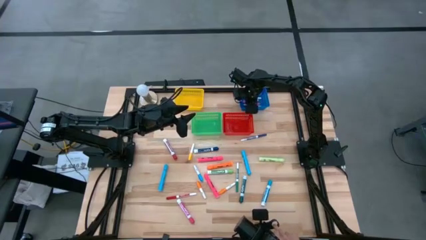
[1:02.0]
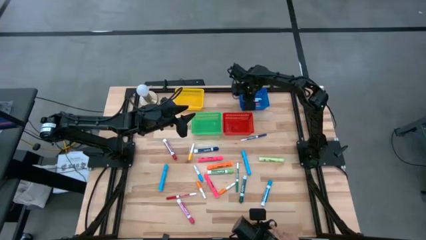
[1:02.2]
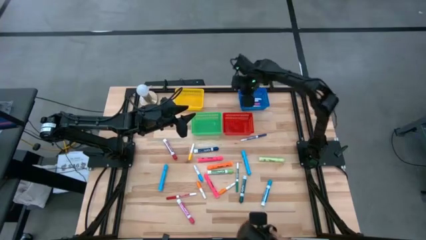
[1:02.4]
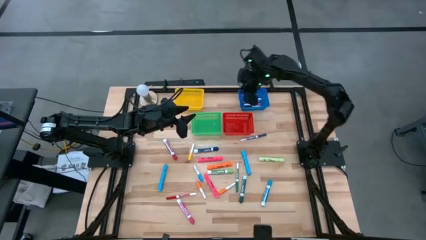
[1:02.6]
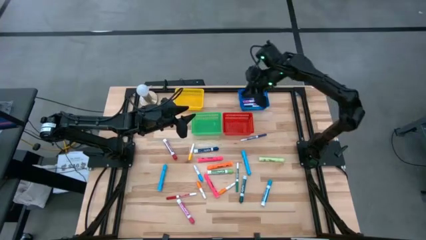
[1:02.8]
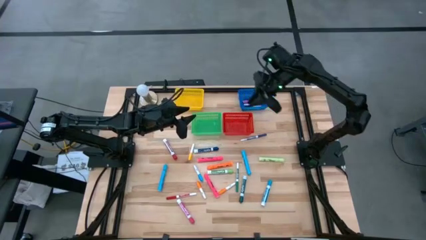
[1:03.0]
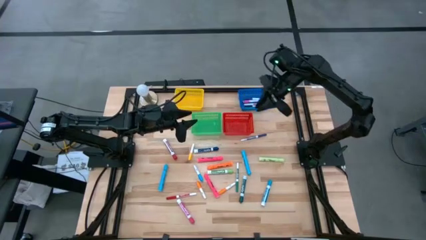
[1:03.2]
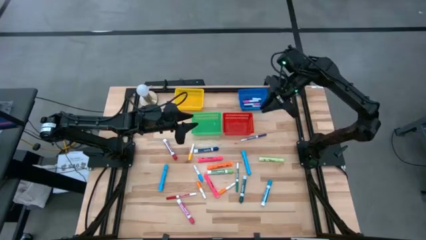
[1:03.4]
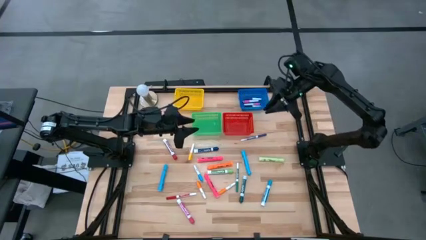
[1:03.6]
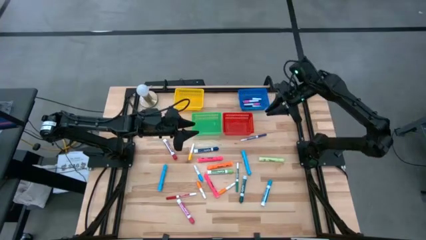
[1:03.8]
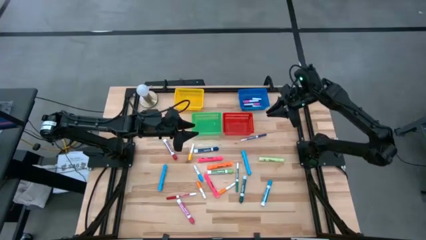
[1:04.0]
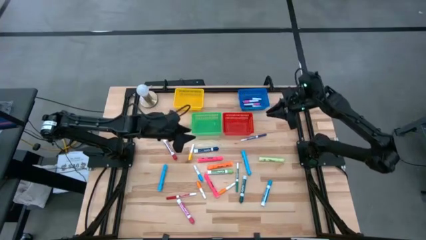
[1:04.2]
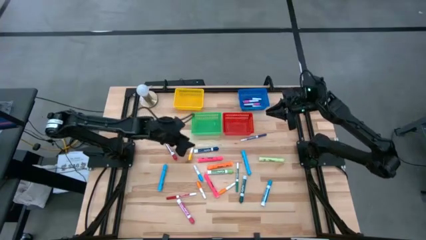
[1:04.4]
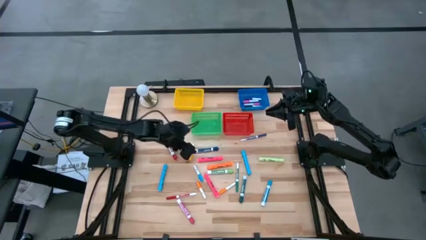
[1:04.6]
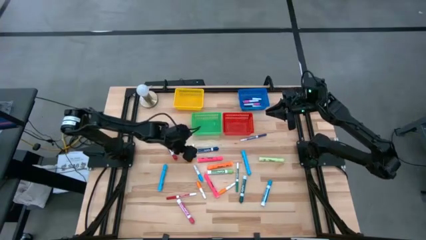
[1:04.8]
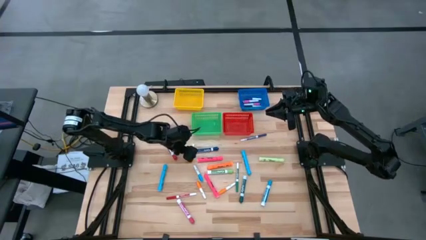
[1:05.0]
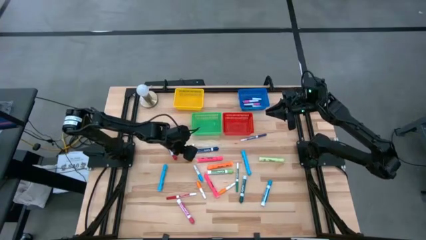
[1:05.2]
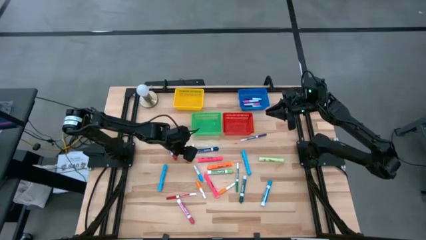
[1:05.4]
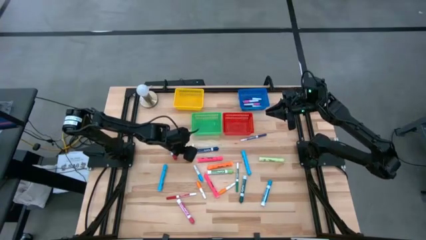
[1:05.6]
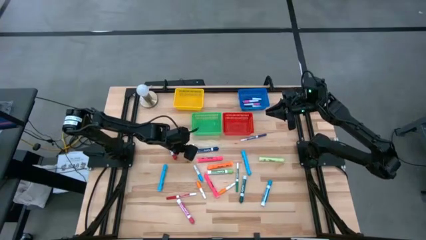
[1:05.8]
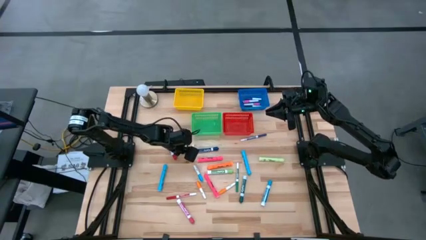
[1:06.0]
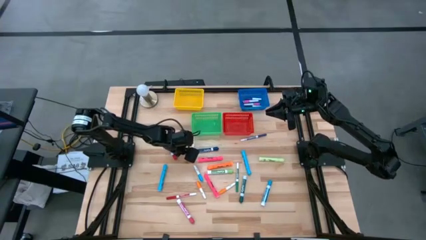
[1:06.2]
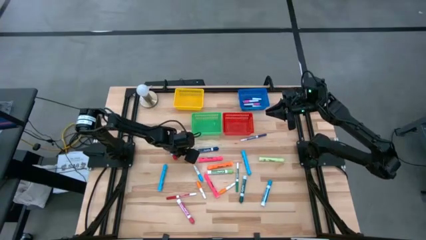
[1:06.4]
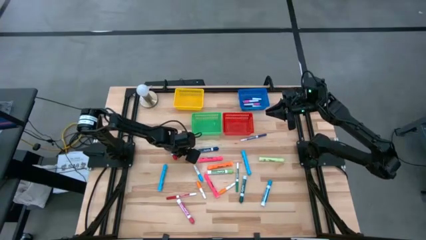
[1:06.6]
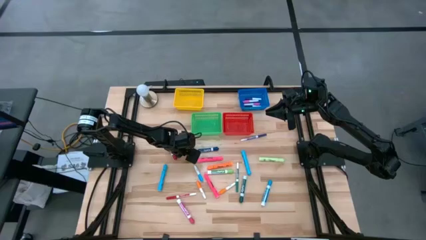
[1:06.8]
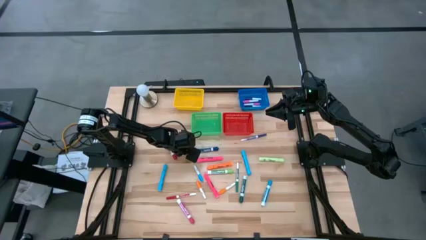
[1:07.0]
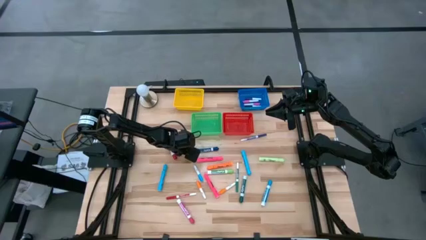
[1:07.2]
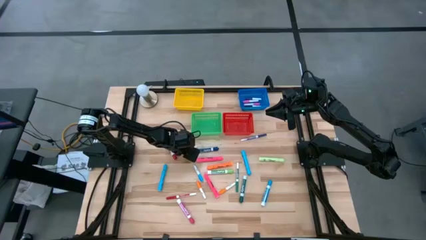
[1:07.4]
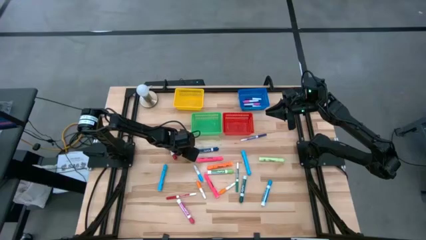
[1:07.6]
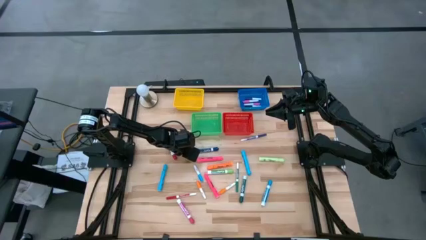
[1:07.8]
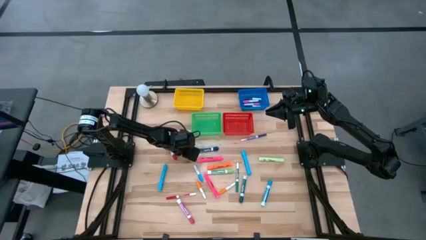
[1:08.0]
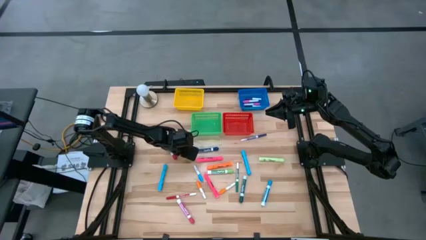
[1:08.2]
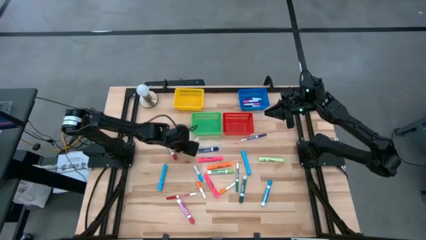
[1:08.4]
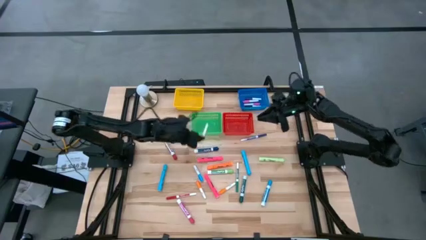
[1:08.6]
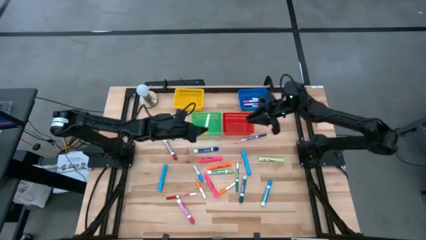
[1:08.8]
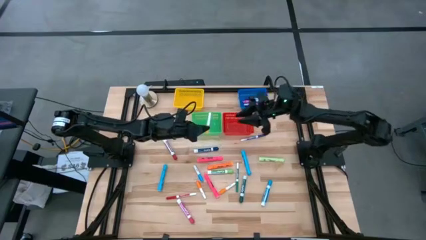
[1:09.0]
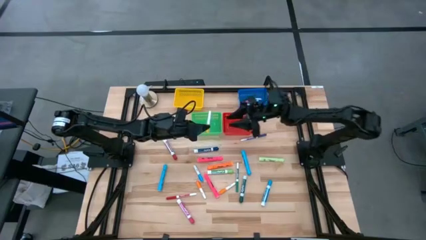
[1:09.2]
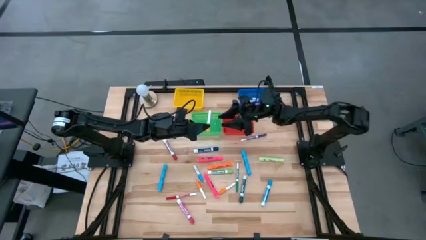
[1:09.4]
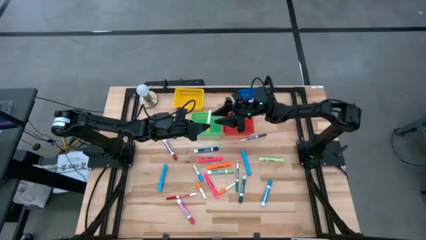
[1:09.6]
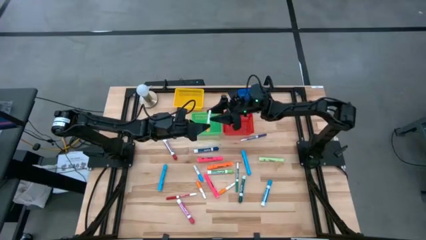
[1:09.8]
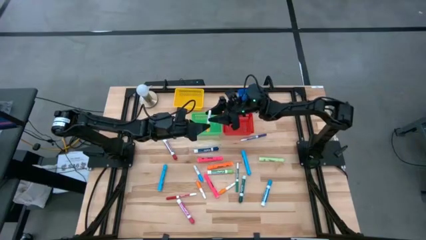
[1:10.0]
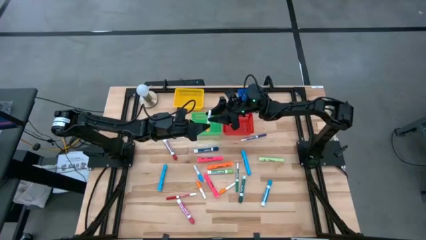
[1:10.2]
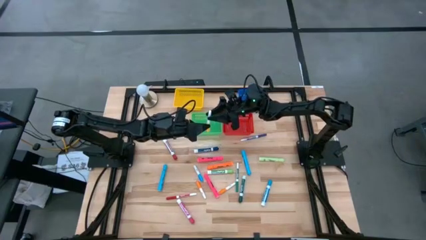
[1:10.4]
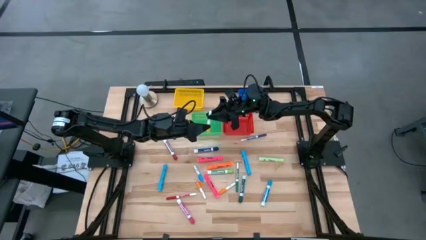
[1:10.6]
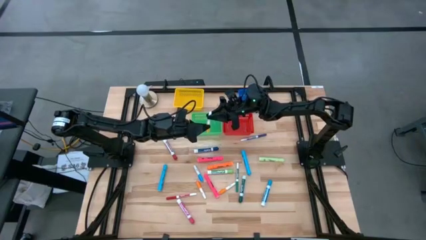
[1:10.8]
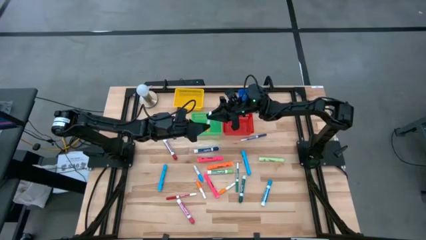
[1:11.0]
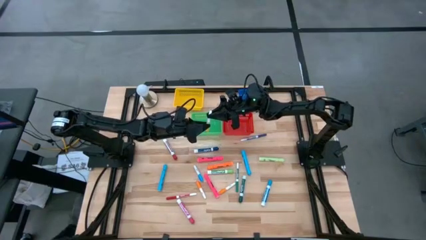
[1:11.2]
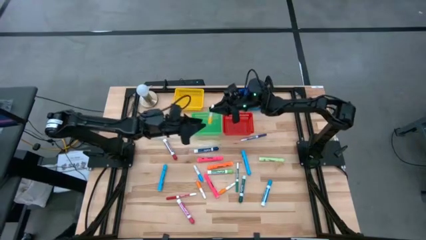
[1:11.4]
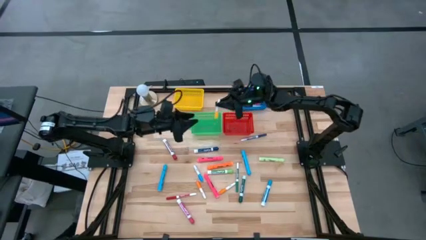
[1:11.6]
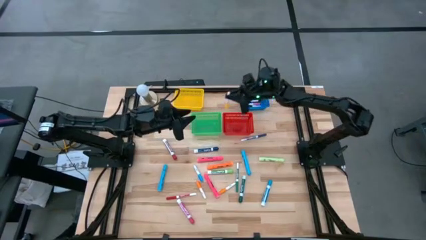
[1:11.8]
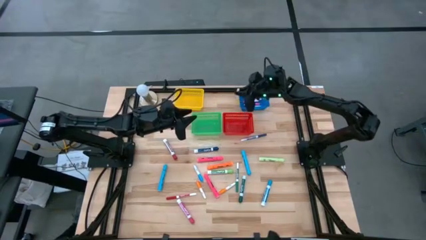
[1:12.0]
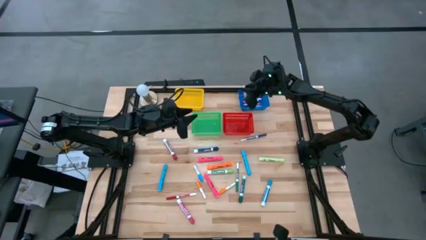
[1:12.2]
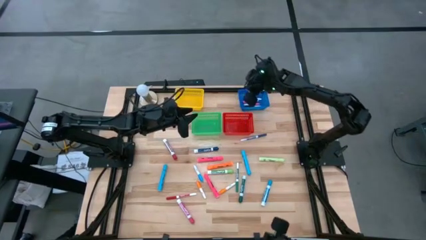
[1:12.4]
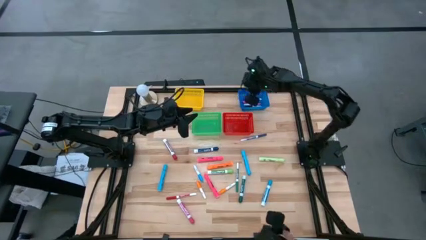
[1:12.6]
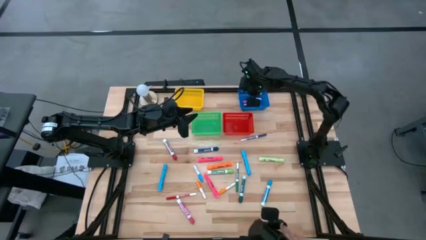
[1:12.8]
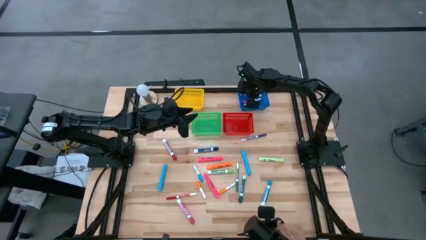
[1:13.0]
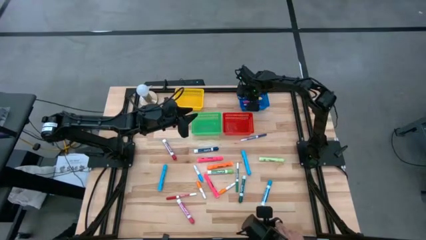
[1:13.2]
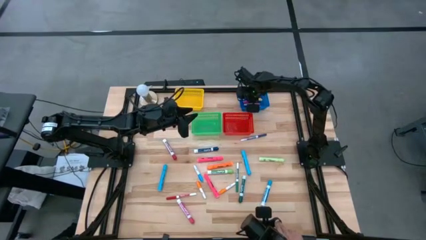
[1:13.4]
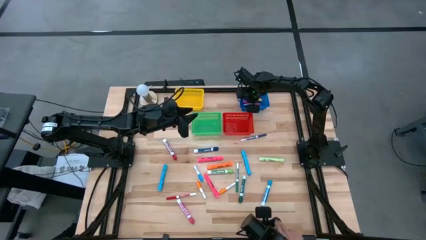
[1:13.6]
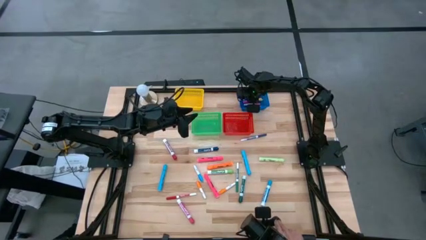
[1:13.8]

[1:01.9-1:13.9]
Task: Pick & Place Markers
Put the yellow highlighter into the blue bin

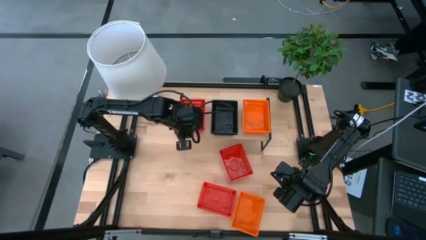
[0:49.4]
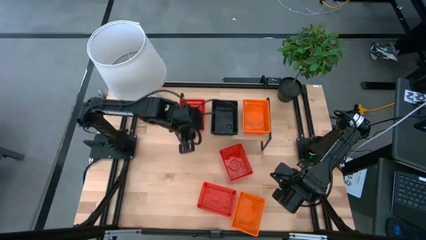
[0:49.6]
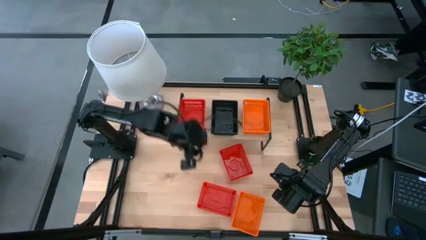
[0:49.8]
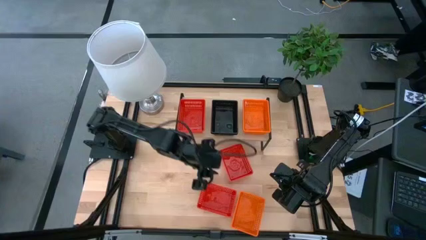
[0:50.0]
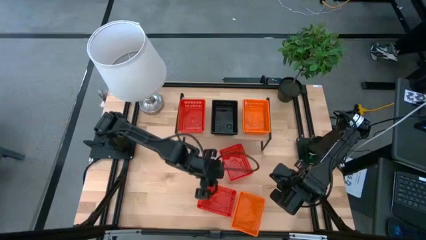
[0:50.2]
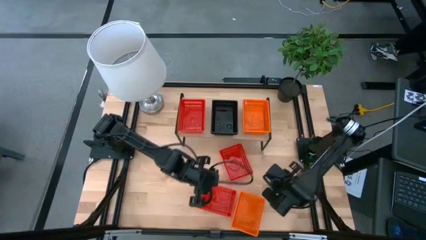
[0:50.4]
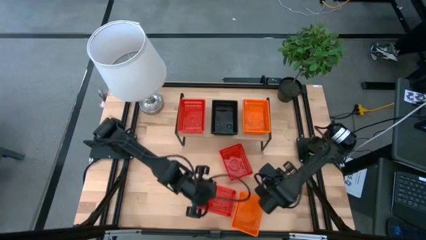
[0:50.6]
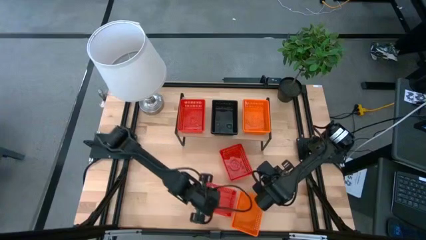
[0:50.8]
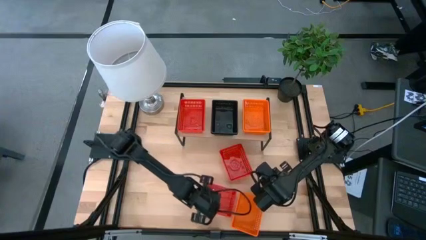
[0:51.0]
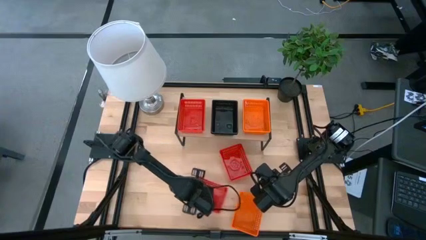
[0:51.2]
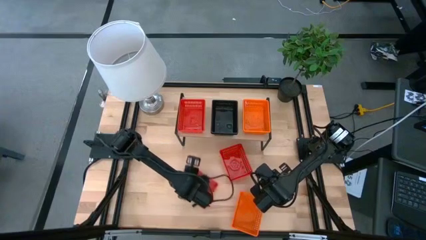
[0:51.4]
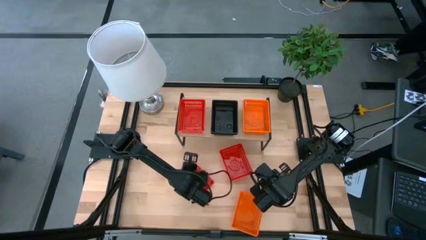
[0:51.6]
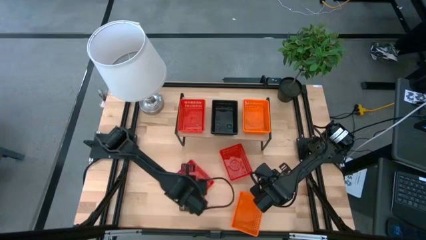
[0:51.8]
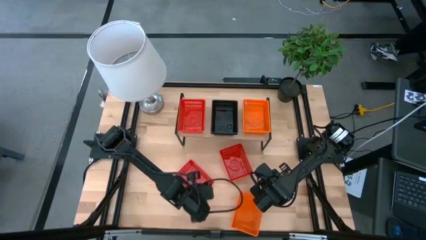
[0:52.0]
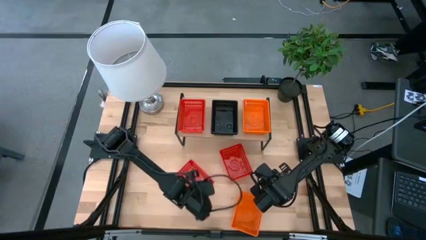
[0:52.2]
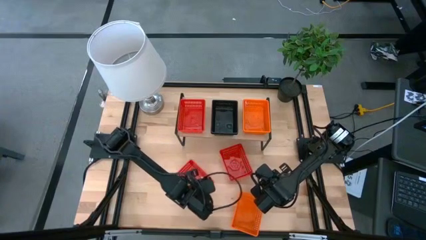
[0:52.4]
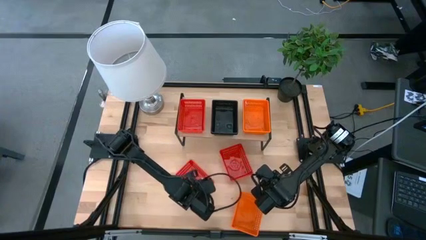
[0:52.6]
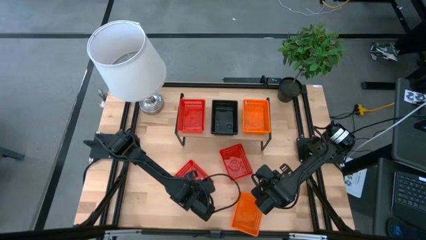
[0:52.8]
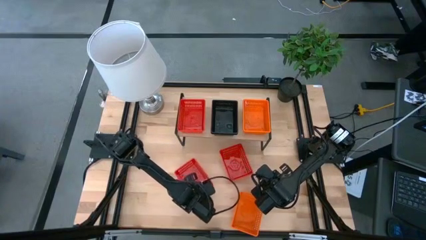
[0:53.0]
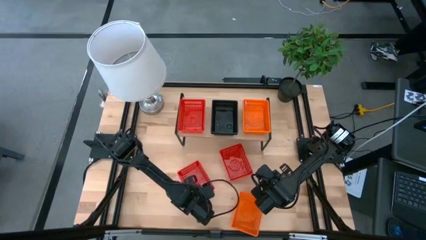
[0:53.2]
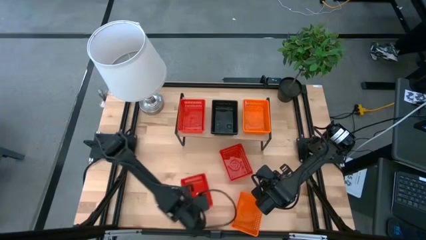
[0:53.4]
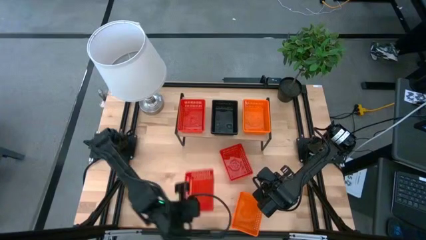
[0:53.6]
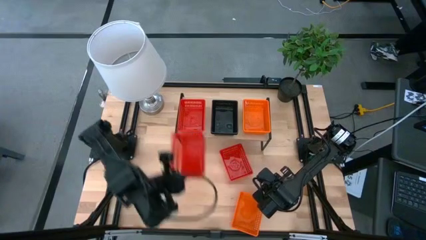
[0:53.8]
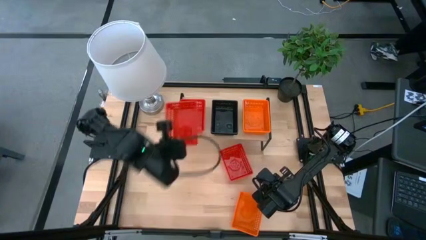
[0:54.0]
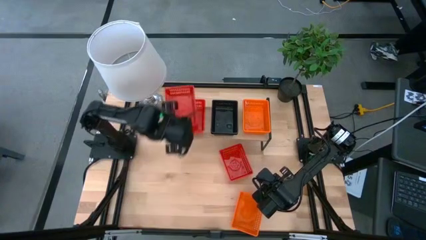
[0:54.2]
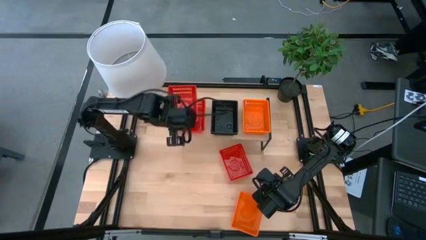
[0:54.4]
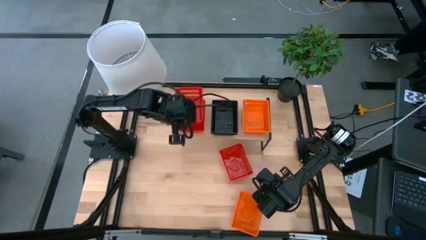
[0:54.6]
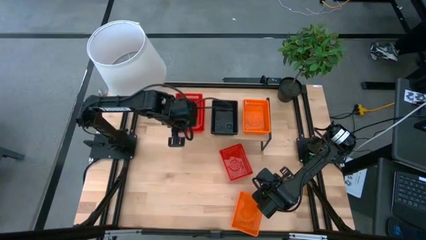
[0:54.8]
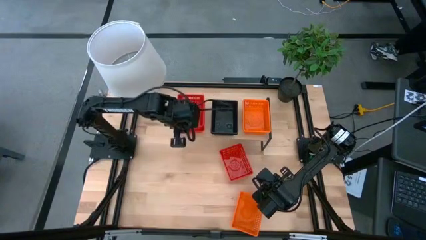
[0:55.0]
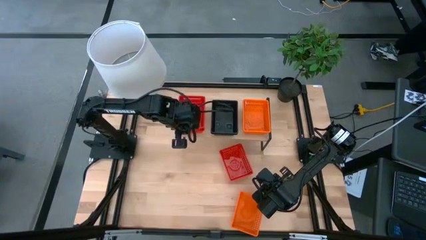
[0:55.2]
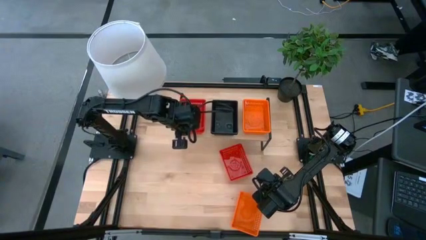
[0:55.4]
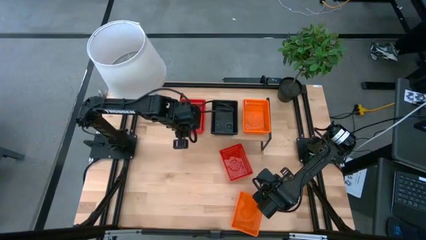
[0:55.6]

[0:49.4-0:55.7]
Task: Stack baskets on shelf by color
Stack the bottom red bin on top of the red bin
